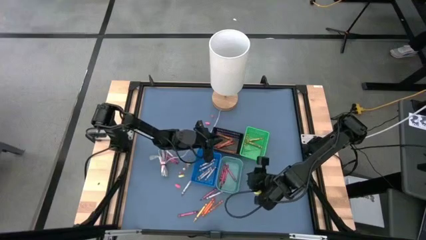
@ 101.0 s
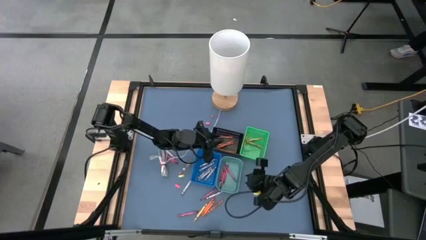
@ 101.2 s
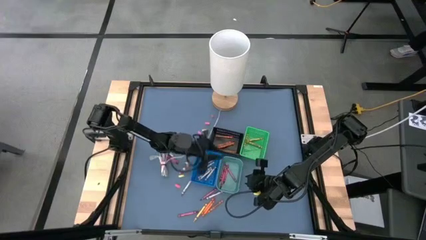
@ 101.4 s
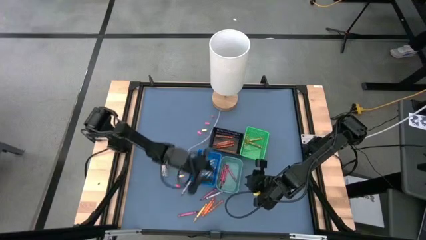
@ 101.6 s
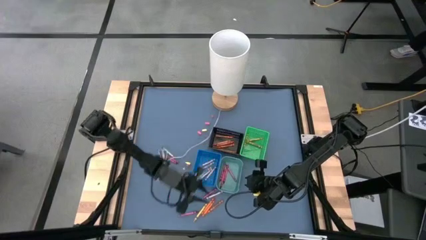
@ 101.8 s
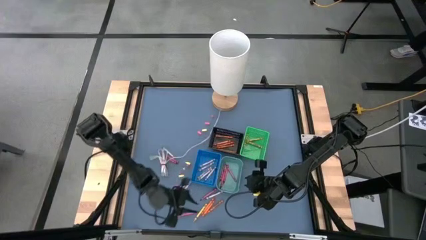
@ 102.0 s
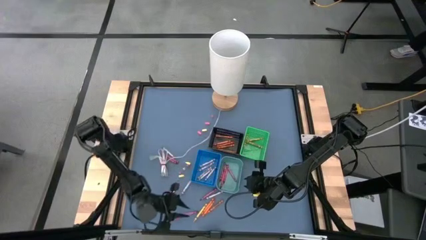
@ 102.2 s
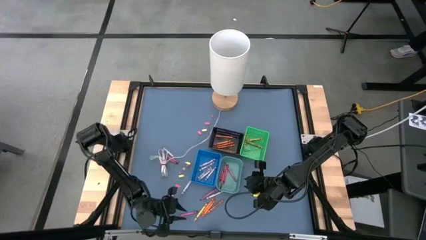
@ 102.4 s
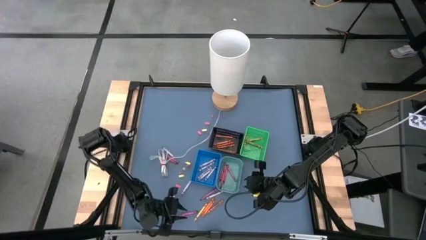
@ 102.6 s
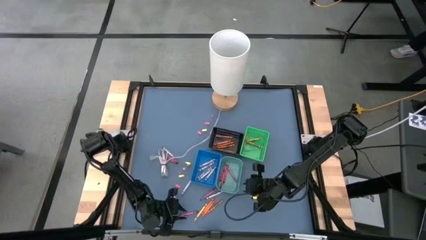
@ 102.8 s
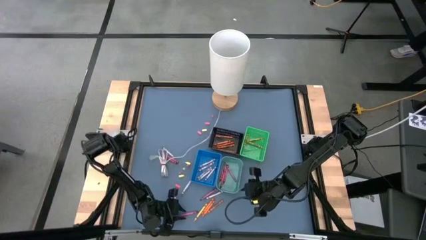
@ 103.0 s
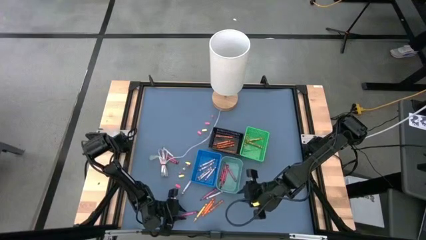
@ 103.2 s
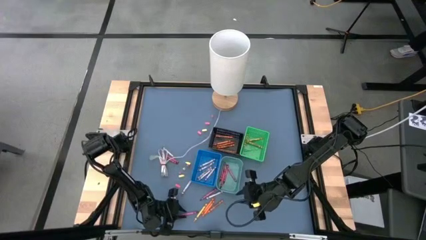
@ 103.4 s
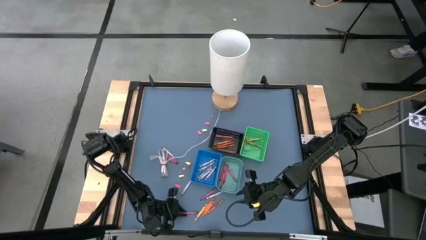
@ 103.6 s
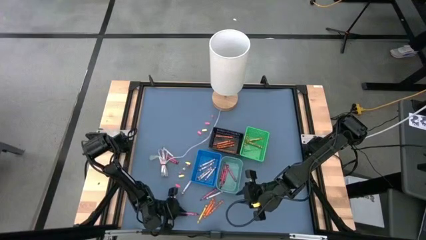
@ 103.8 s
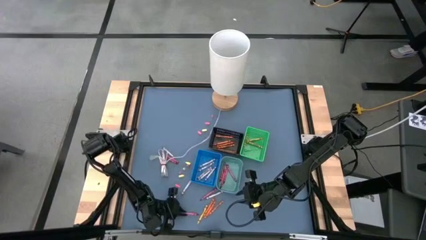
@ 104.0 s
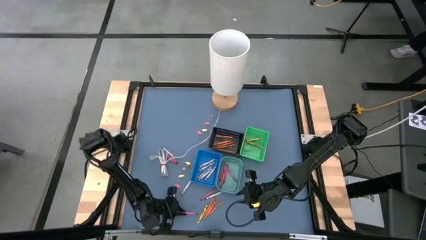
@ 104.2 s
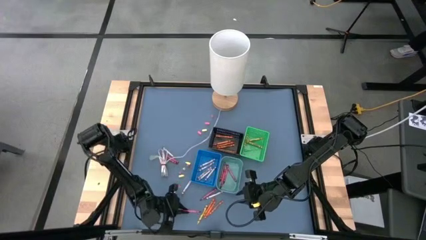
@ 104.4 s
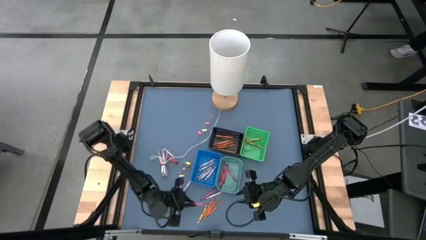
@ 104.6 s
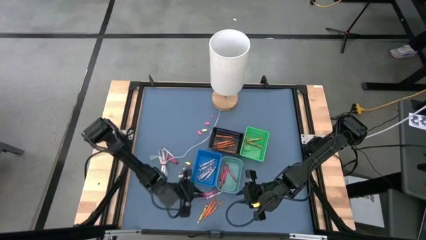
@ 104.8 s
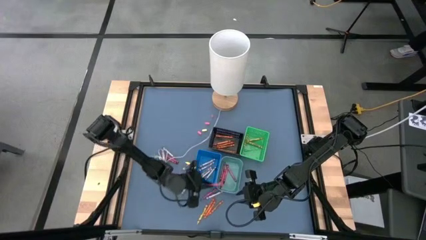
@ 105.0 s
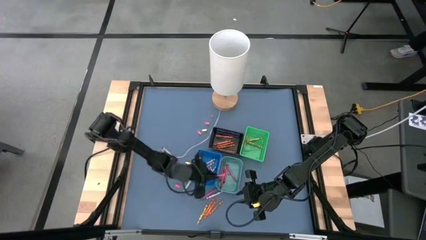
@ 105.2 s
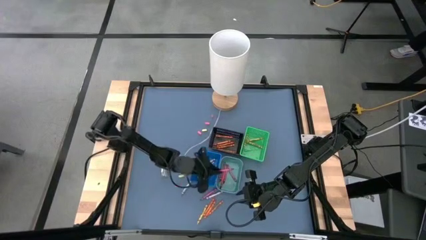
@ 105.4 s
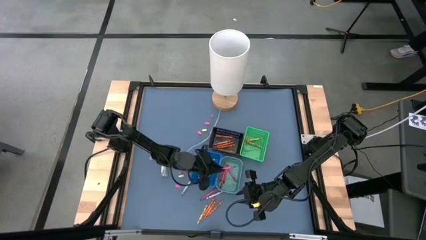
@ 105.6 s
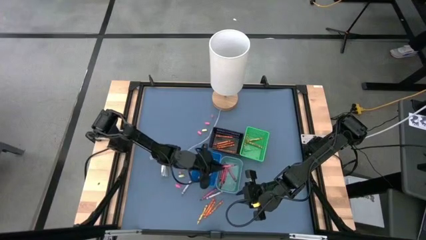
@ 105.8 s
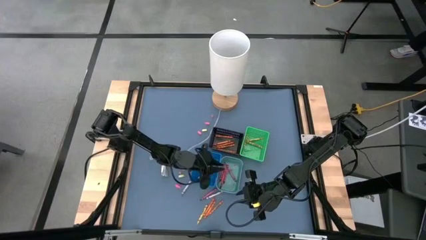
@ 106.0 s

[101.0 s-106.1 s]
Task: Sort crayons
Put the red crayon into the light green bin

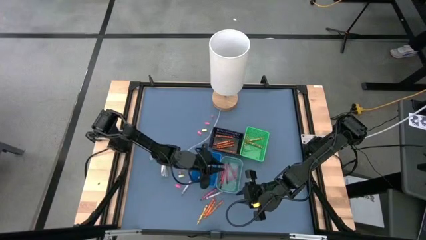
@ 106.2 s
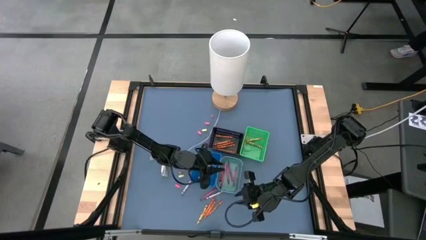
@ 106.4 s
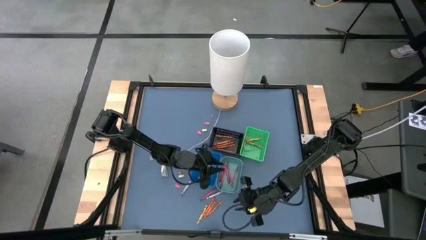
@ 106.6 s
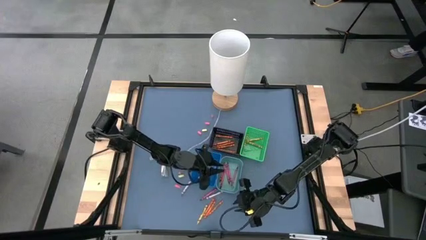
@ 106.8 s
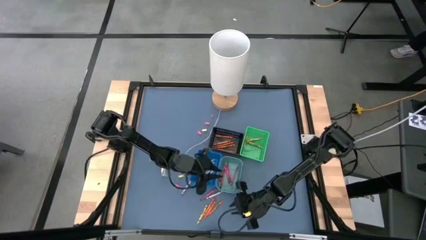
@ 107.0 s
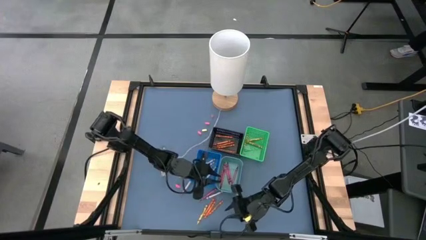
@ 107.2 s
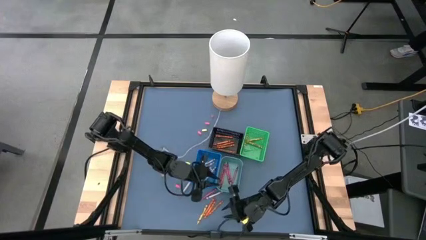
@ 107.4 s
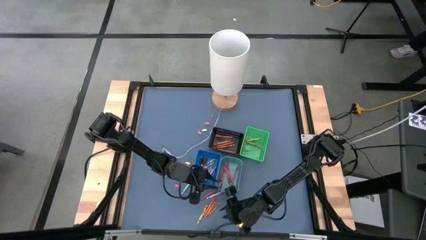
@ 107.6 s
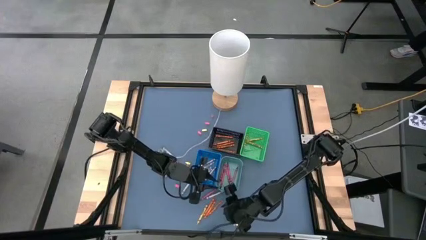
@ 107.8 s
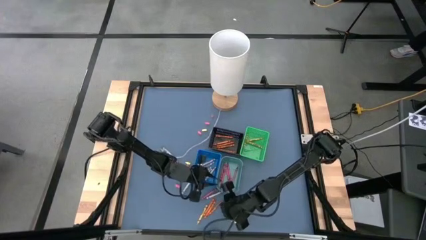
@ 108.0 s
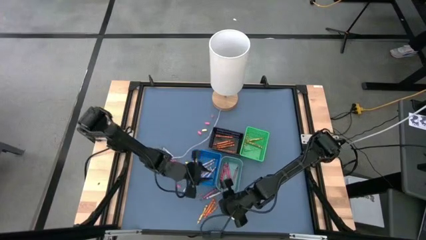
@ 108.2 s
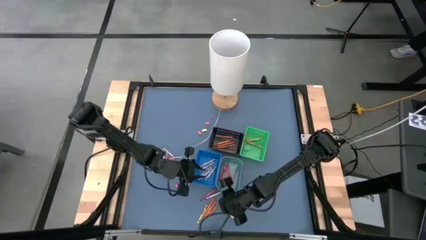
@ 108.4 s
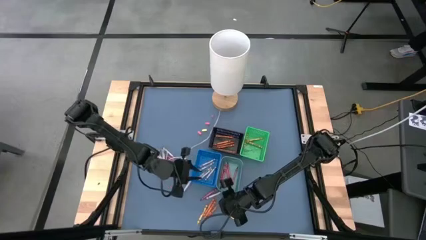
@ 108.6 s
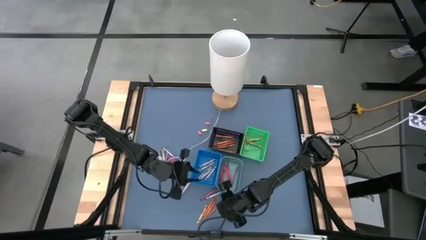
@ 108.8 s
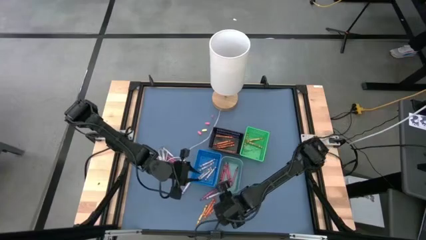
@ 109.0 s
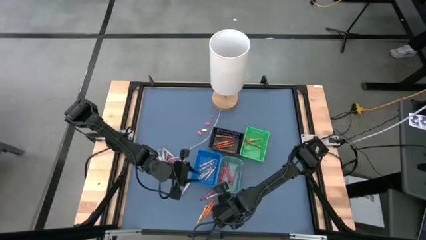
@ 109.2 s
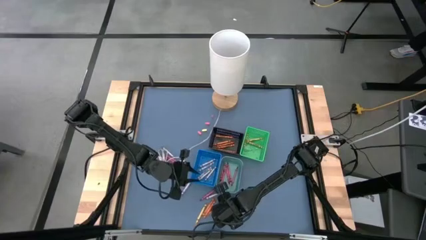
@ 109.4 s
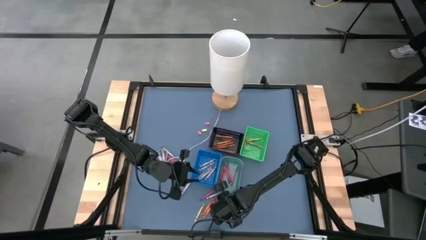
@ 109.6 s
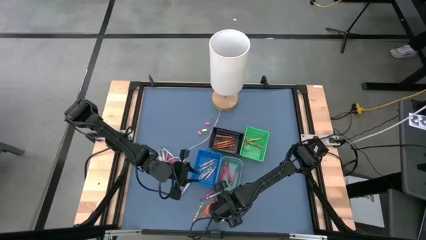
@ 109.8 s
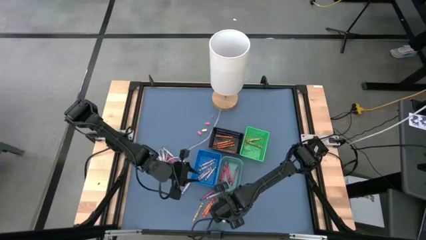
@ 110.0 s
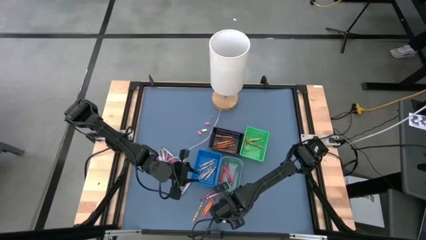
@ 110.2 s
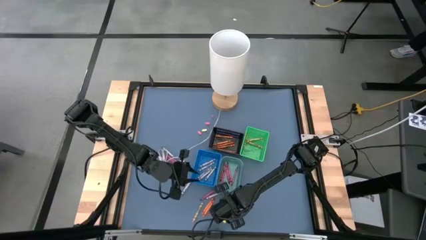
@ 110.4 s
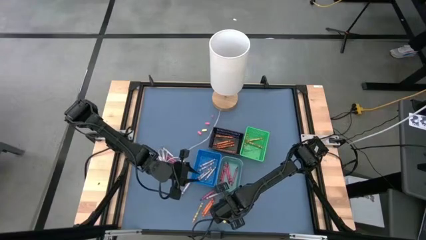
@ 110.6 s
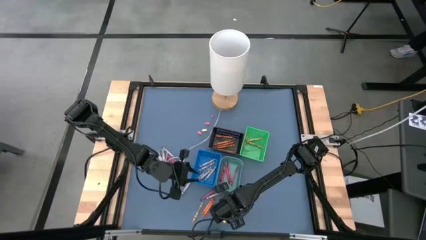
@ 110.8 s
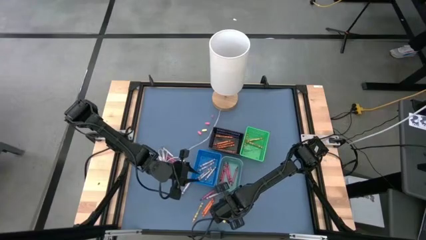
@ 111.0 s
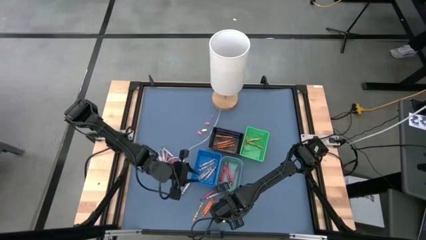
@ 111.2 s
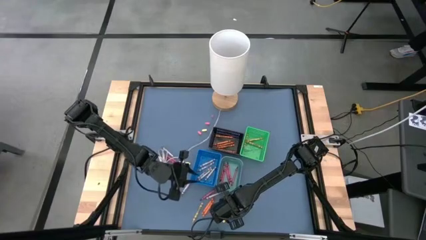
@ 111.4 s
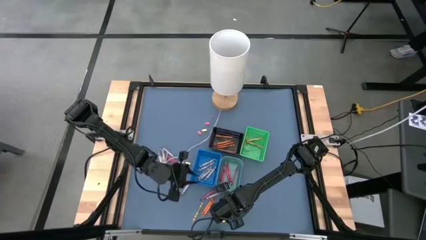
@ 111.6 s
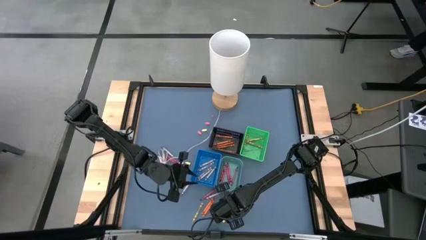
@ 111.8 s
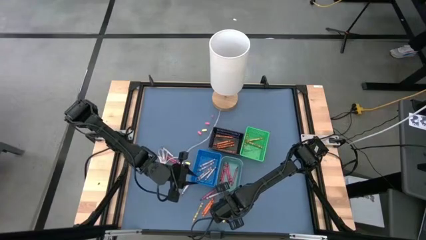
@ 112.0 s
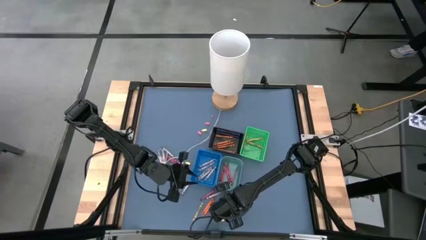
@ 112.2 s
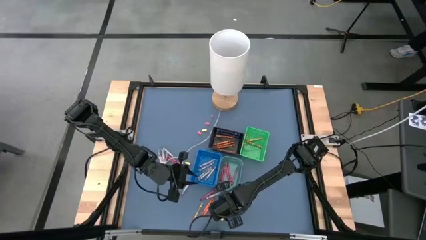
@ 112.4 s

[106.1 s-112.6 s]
Put the orange crayon into the black bin

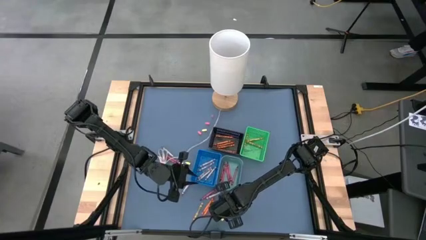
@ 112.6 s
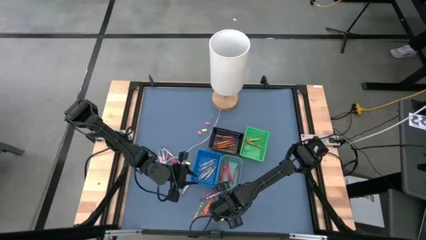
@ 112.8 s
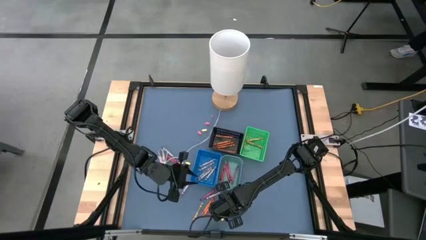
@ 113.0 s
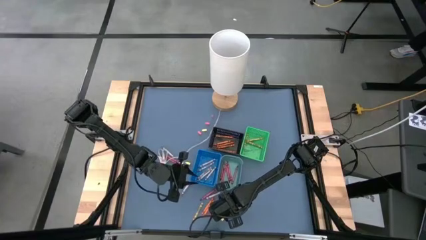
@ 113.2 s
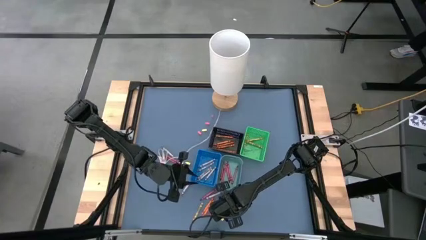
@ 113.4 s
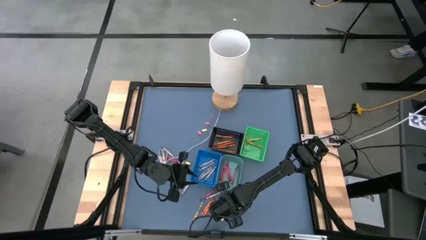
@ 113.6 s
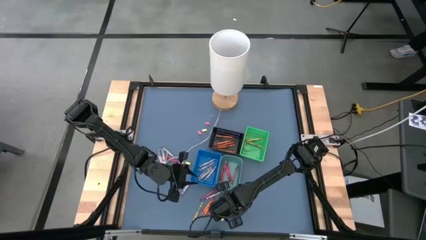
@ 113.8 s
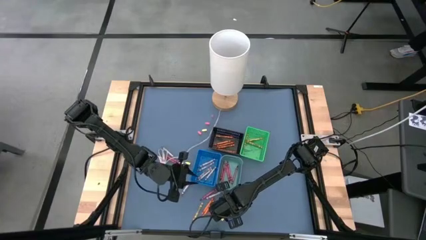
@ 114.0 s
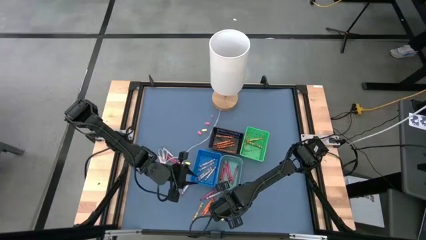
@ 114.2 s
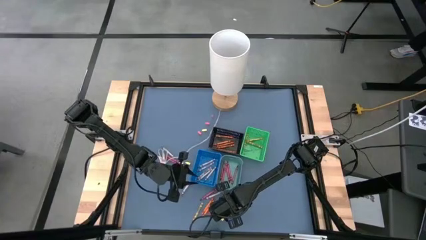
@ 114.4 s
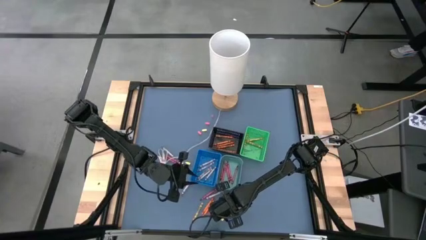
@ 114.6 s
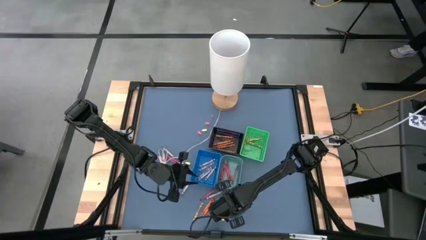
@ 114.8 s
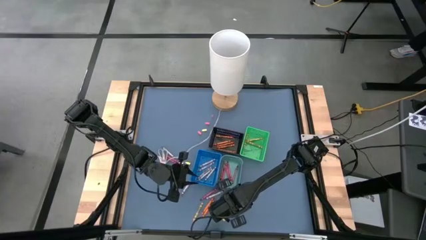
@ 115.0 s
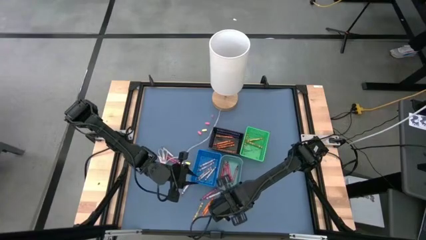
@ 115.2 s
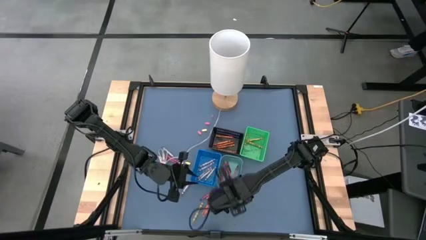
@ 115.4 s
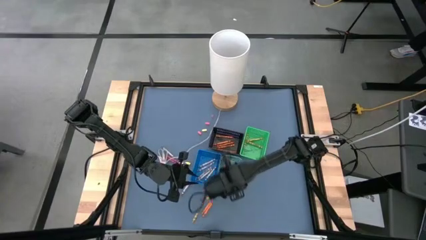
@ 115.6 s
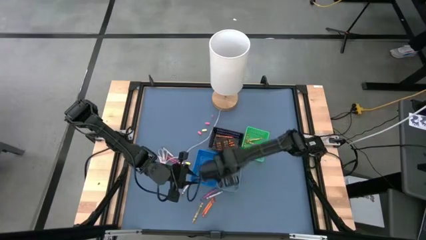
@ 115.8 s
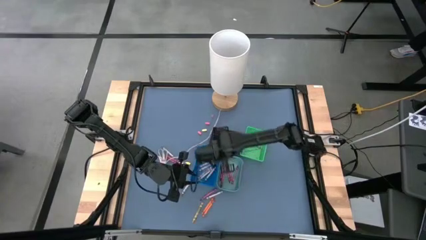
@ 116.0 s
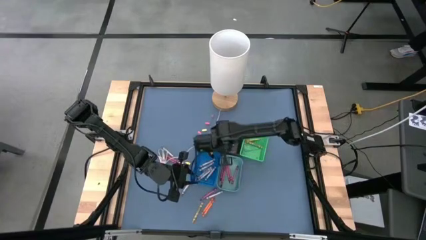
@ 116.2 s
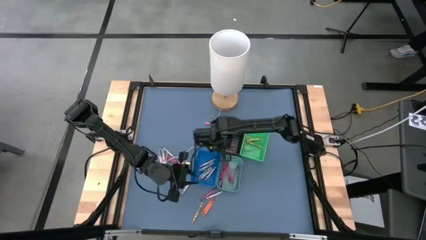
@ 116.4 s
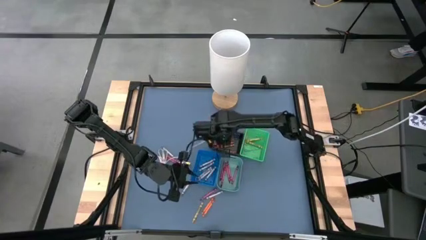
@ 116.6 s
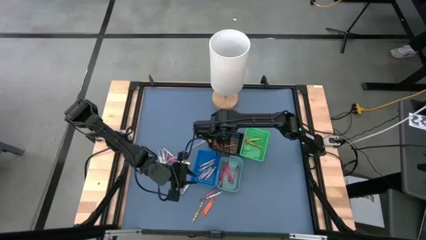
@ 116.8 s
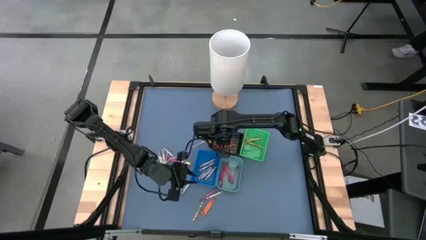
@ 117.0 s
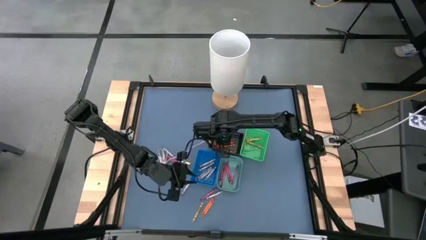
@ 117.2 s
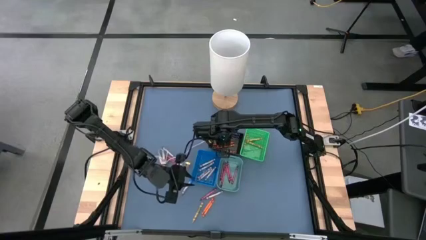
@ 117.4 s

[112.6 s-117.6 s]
Put the orange crayon into the black bin
